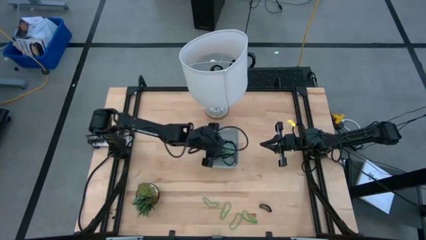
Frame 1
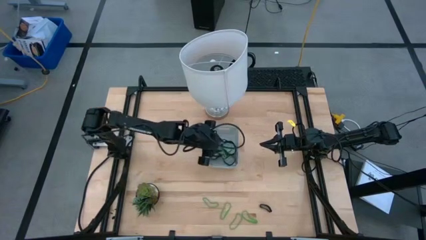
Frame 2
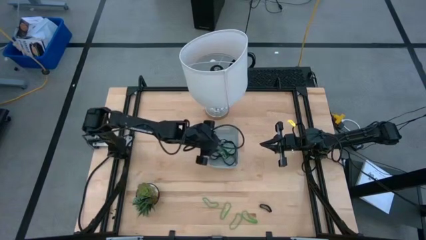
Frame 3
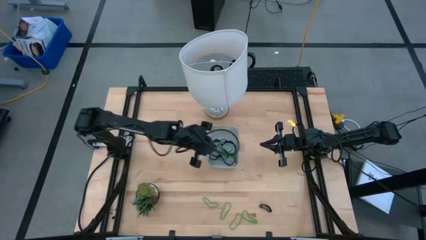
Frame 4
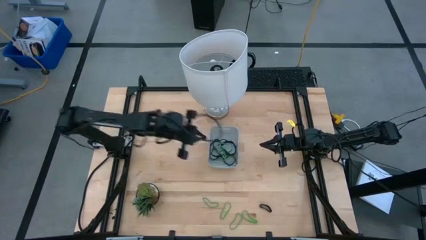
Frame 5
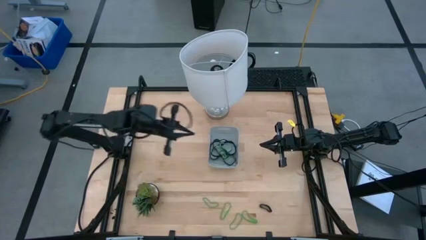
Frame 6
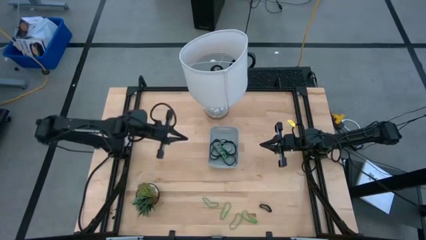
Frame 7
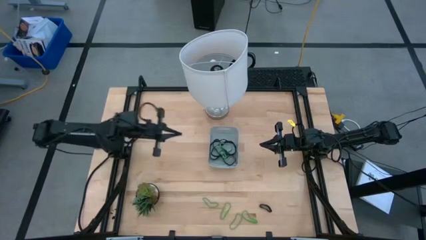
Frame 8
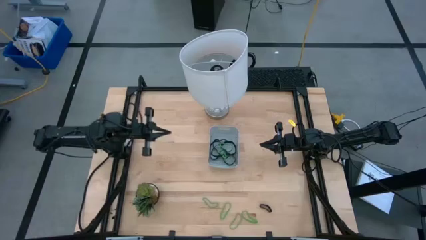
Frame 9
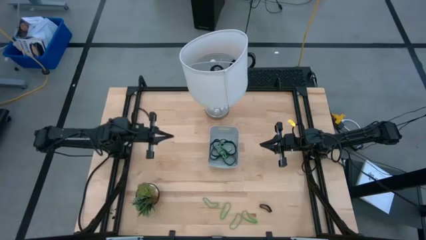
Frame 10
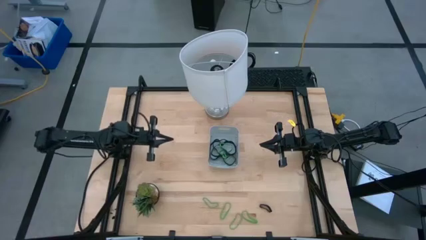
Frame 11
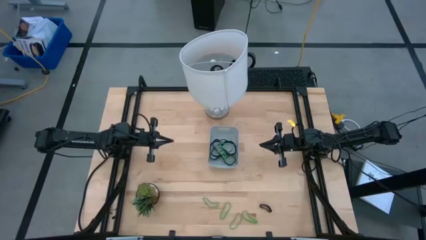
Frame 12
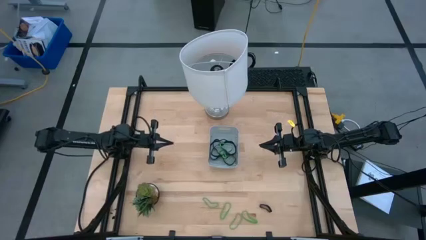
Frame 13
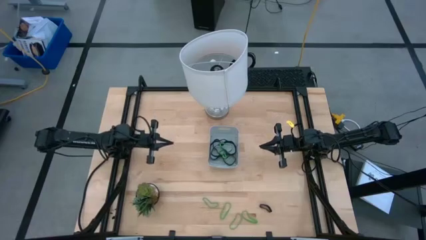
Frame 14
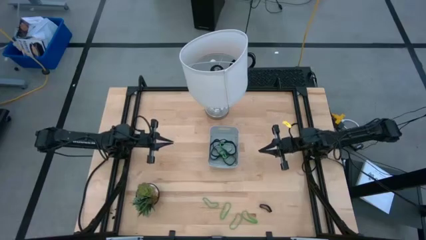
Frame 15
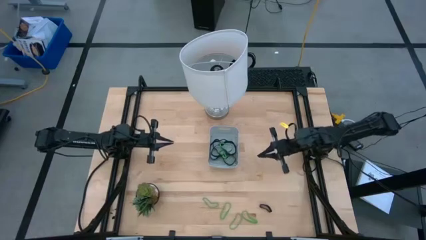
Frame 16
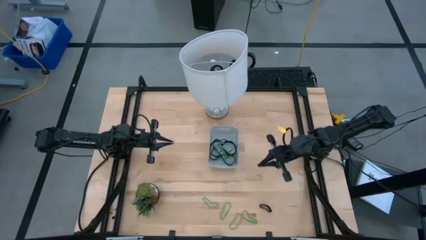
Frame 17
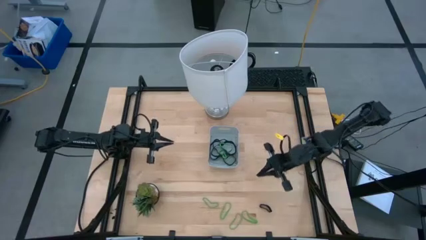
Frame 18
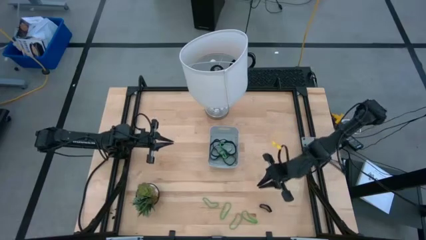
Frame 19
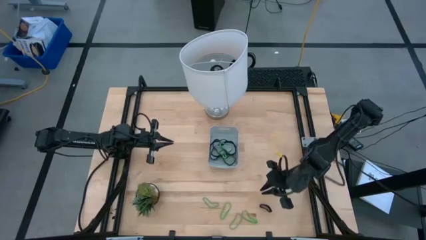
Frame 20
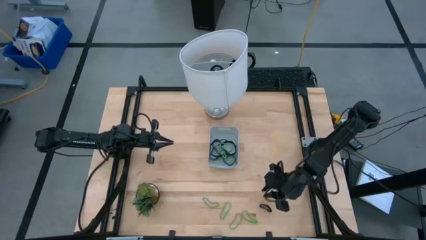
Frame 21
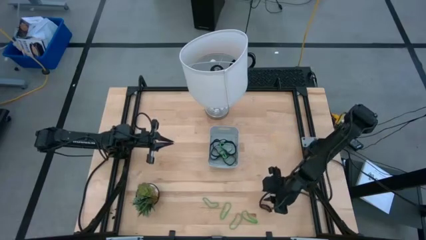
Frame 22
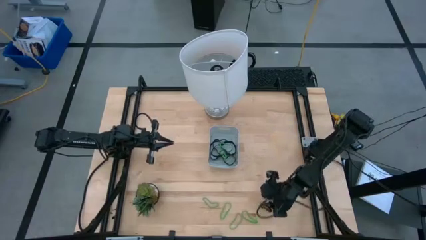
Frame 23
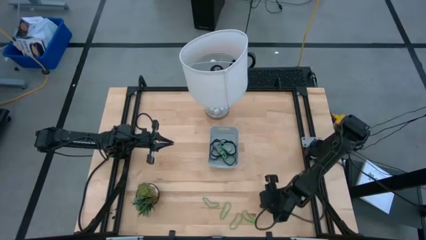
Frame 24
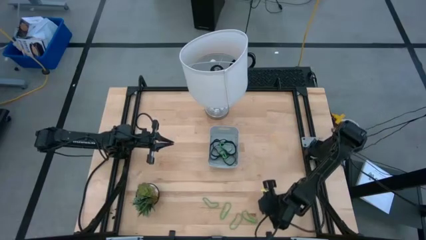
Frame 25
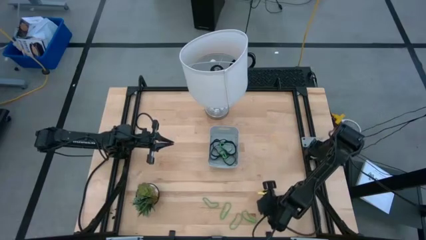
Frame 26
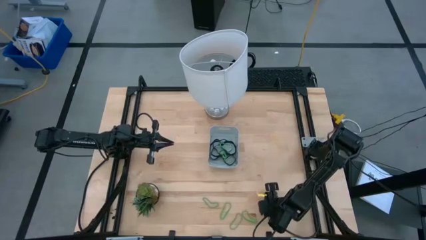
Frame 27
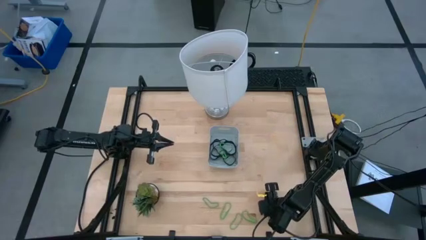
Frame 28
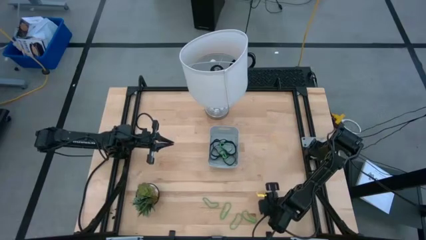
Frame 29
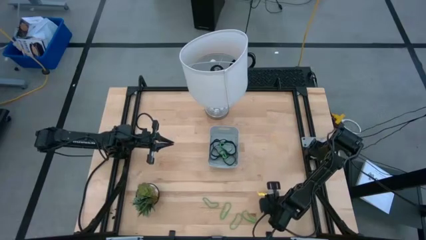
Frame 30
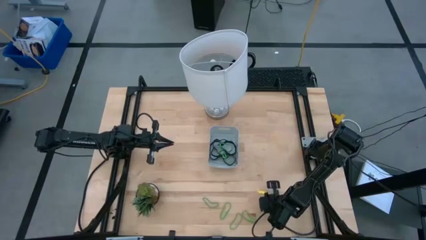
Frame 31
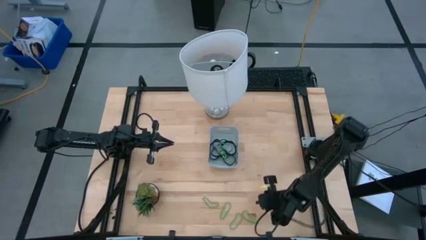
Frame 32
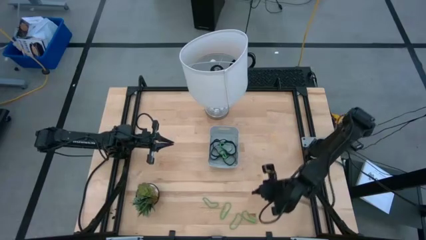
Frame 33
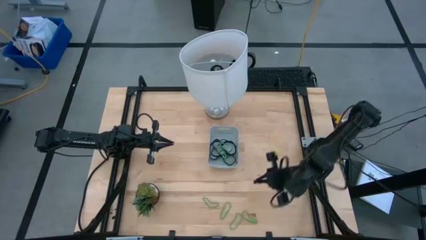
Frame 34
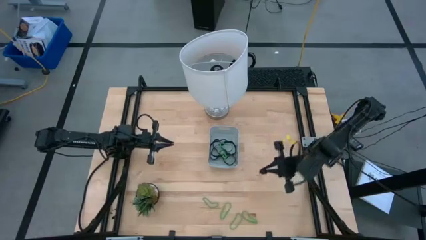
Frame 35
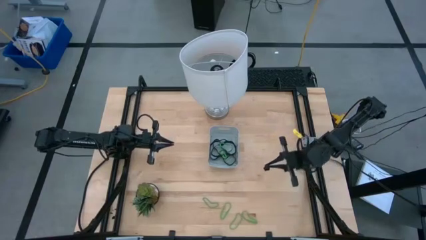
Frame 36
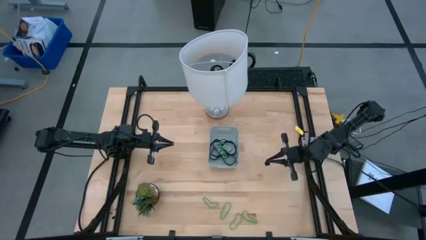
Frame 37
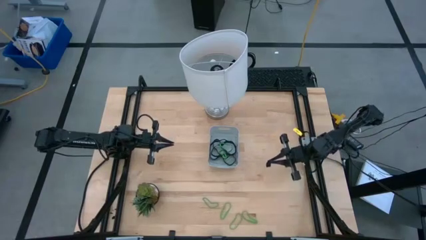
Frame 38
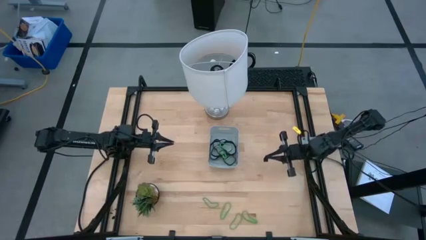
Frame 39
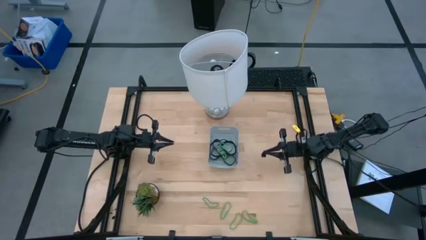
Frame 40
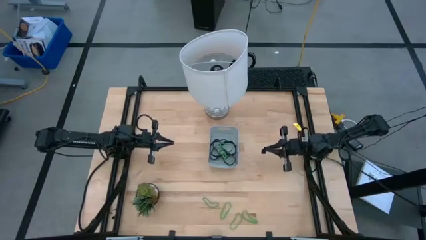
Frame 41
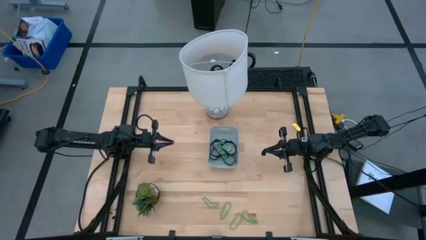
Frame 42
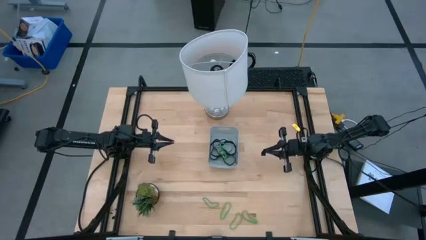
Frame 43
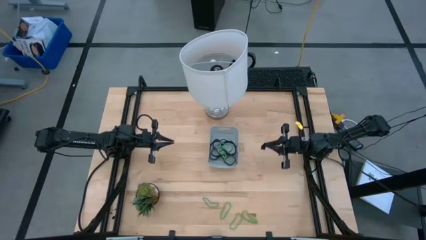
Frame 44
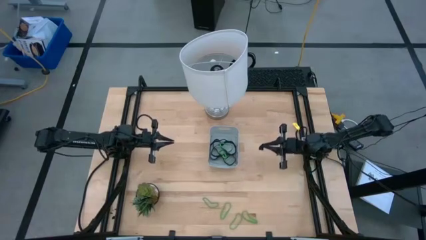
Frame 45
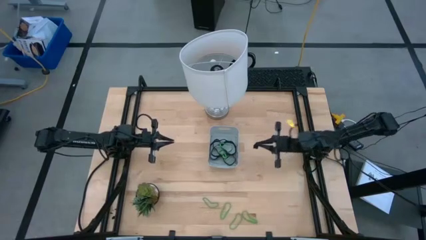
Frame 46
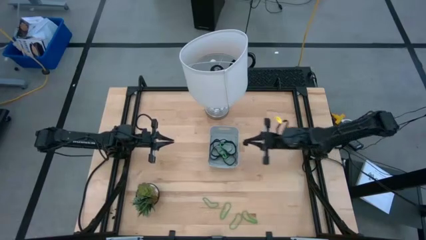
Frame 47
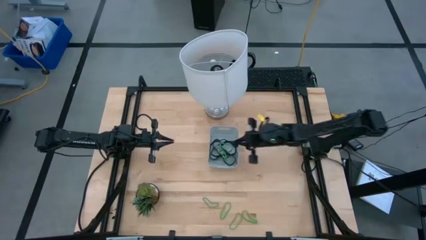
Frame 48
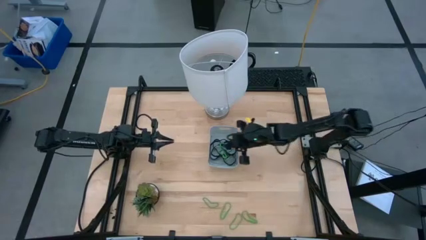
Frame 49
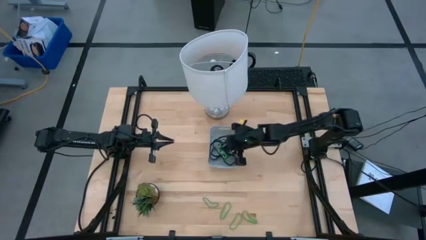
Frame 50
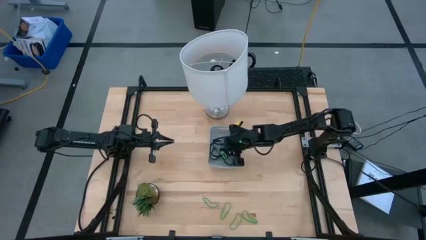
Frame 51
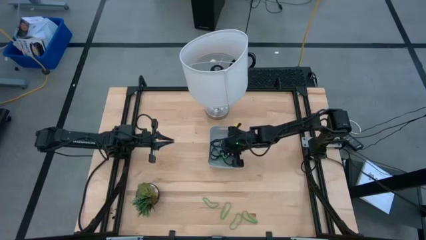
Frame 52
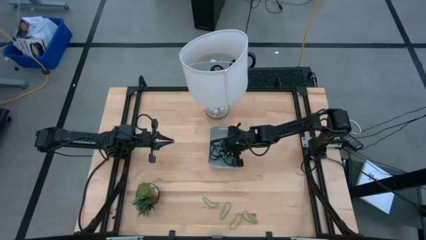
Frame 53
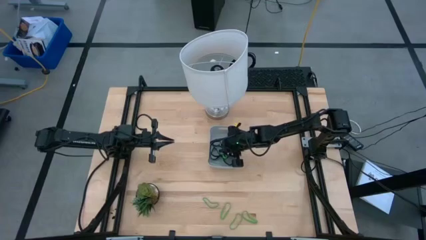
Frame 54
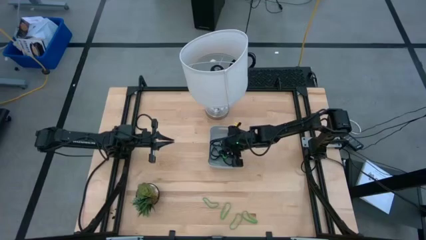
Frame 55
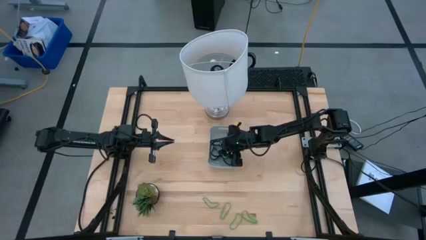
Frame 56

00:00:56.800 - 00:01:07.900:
Task: Pick and place rubber bands into bin
Put the black rubber band into the gray bin

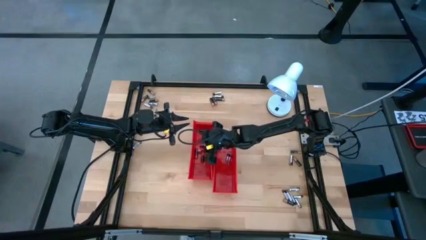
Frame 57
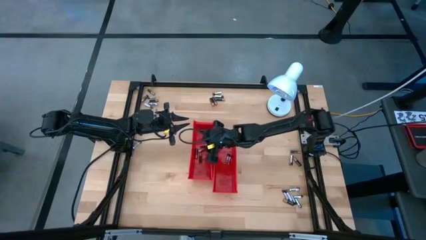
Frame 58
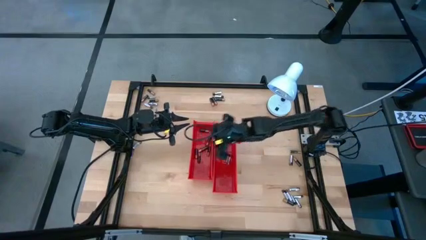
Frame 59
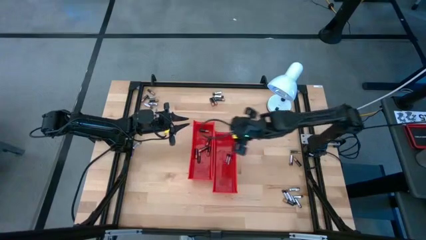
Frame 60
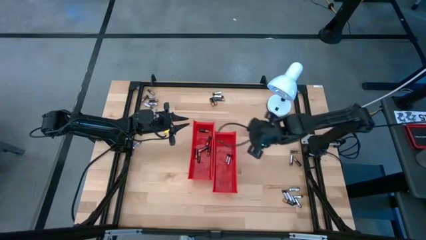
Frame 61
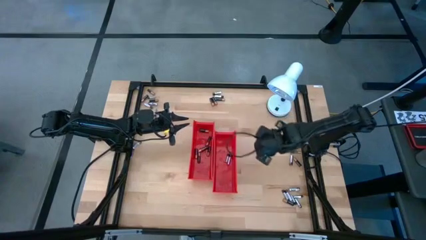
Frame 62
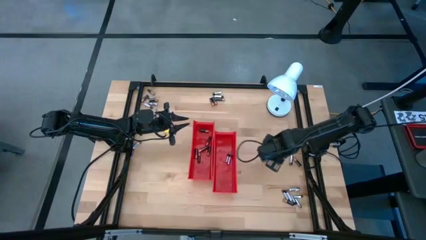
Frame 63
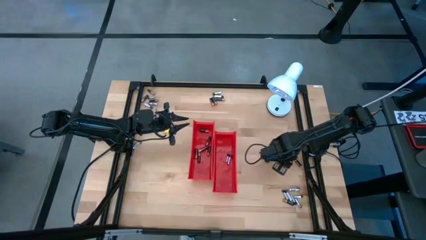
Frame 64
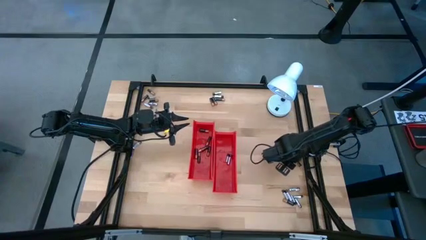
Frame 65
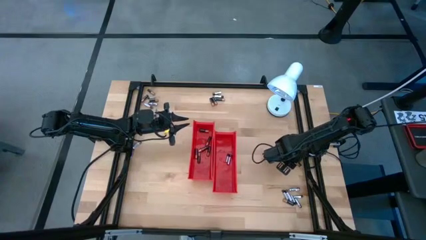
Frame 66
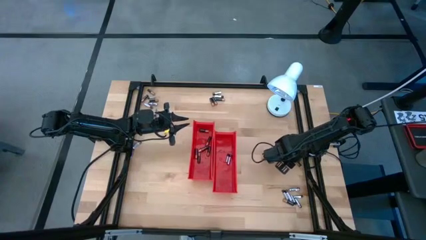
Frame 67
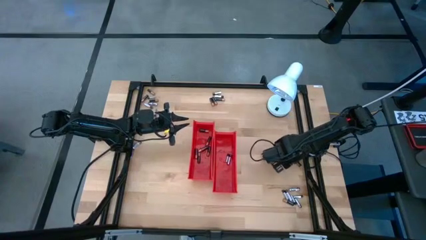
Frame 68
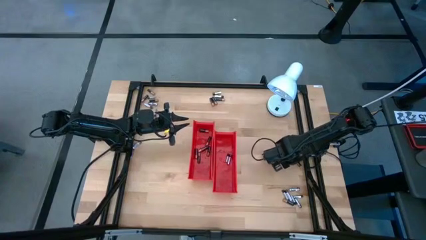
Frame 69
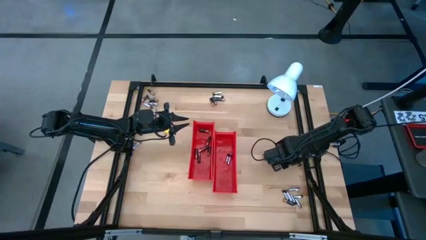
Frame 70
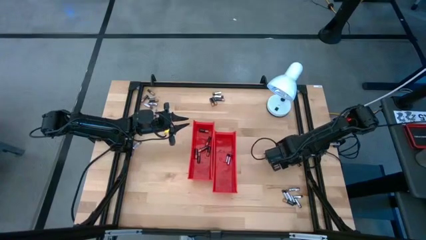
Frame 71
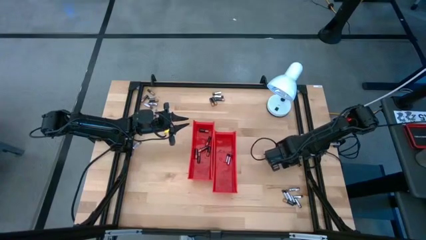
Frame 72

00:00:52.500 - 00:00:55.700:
Task: Sort batteries
Put the silver battery into the right red bin

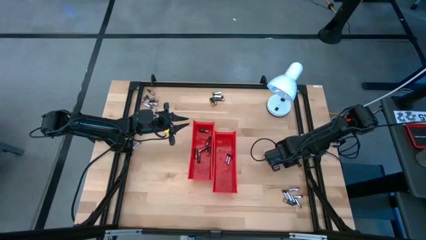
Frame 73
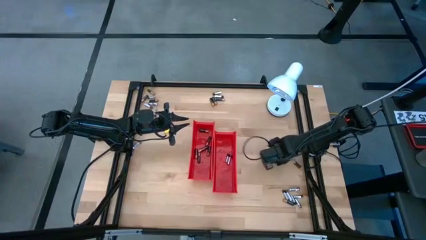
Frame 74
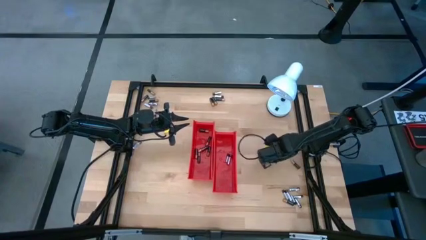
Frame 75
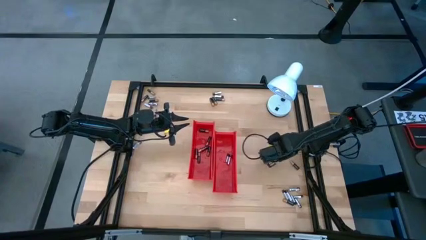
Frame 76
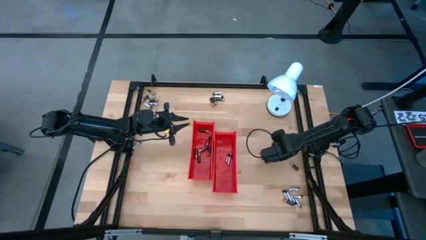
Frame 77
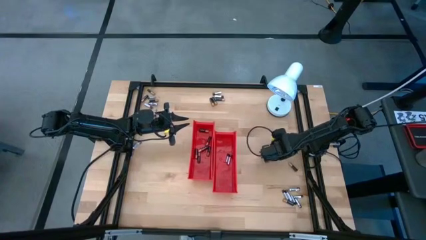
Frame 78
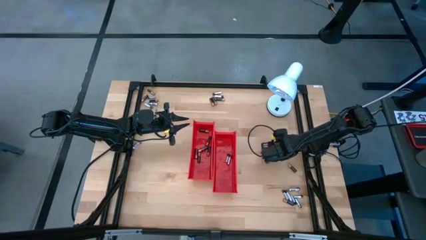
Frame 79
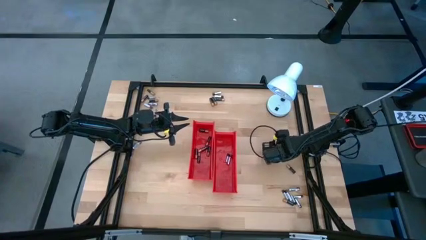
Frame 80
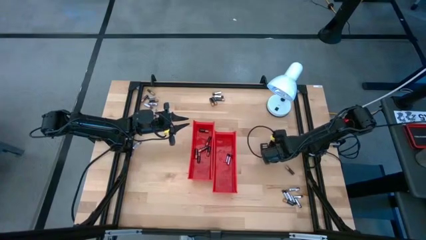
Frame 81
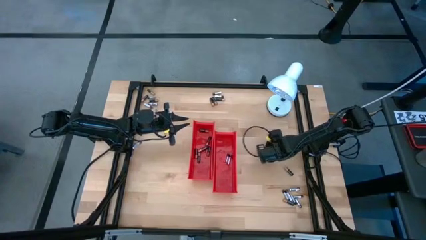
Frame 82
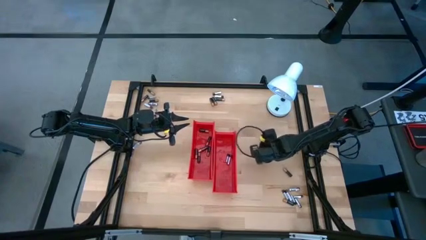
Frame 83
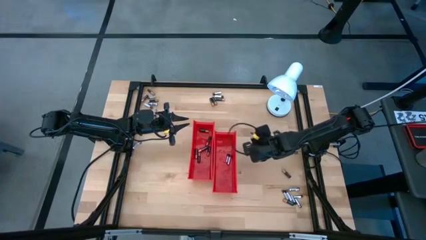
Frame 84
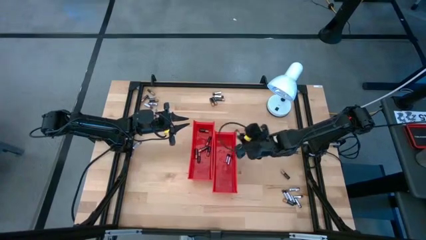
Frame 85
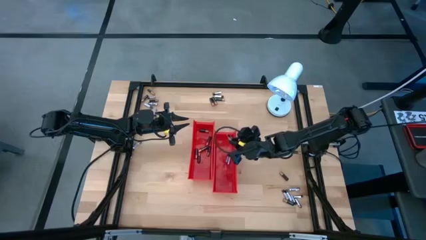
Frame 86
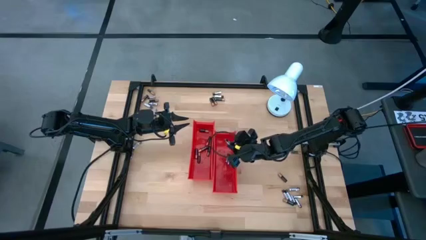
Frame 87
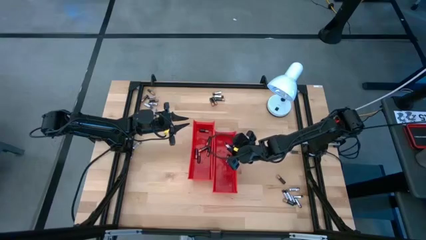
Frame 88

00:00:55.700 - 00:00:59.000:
Put the silver battery into the right red bin
